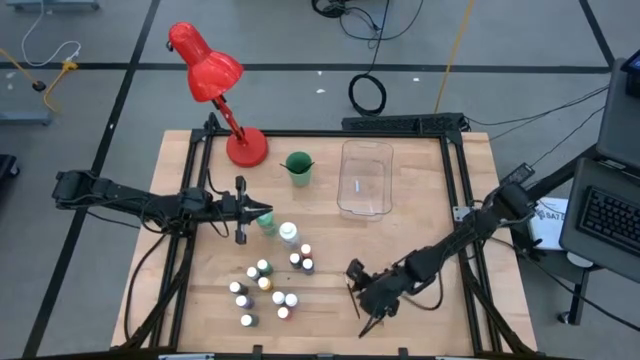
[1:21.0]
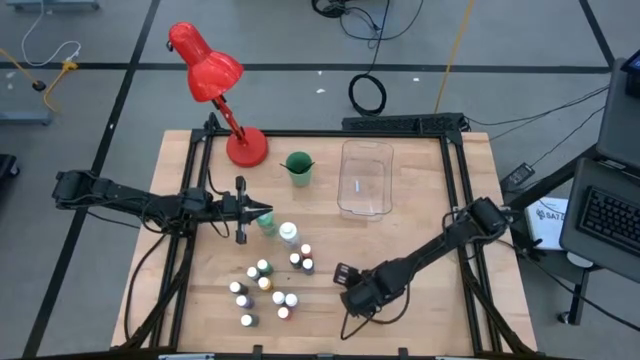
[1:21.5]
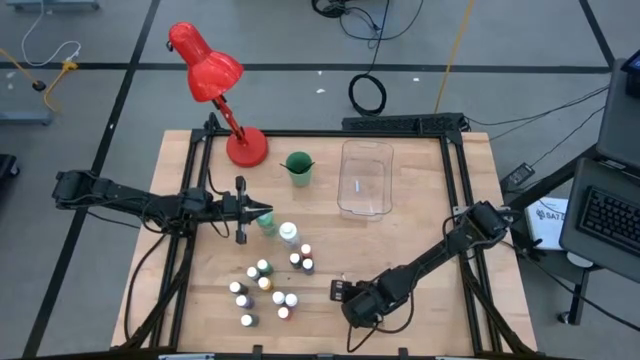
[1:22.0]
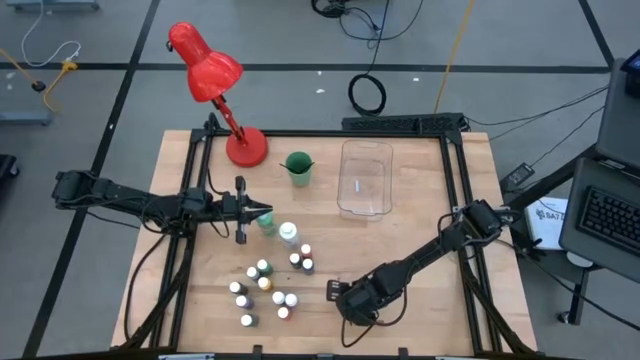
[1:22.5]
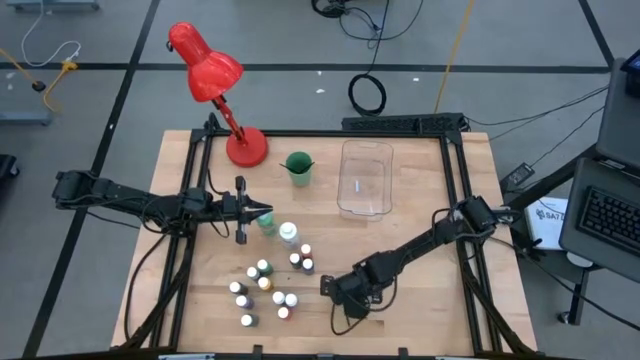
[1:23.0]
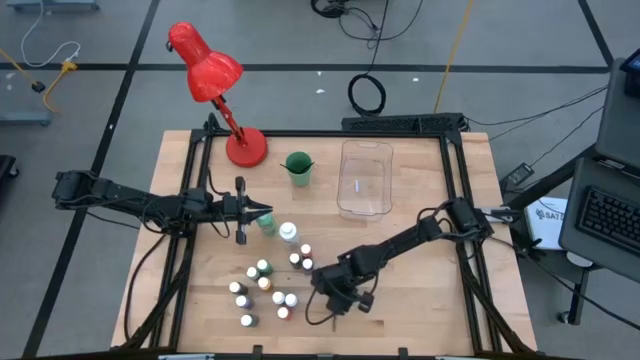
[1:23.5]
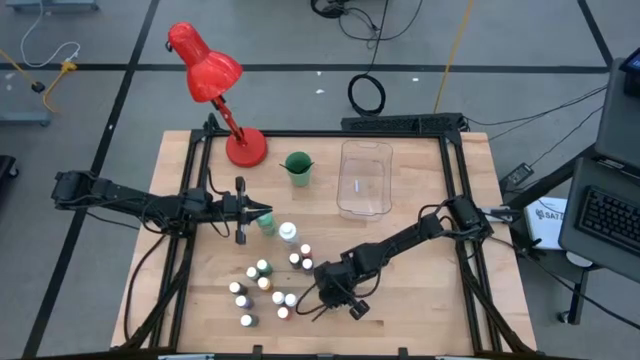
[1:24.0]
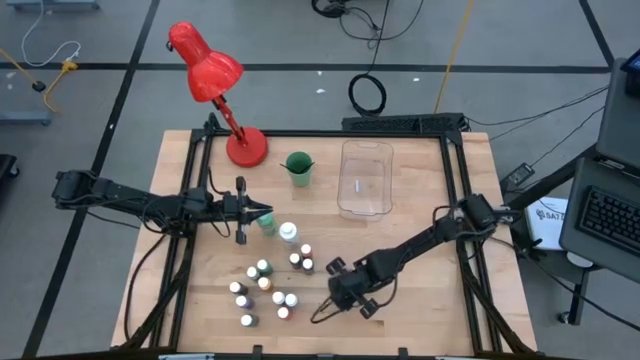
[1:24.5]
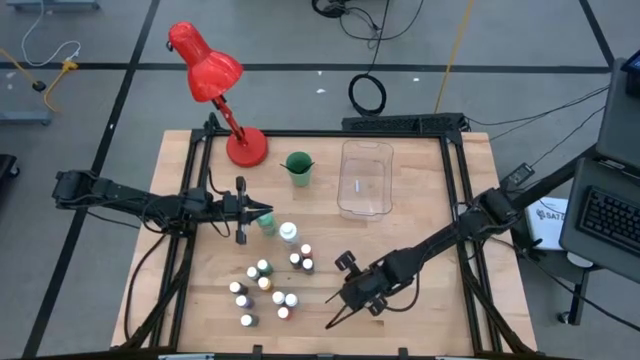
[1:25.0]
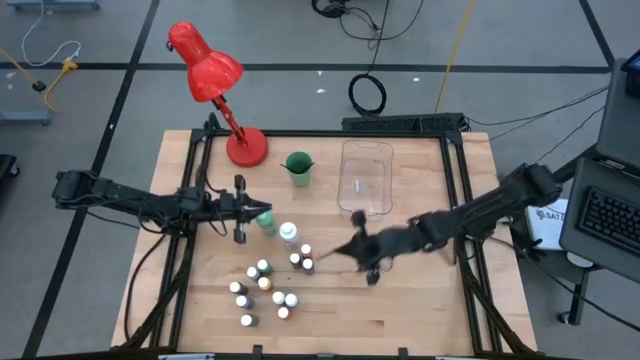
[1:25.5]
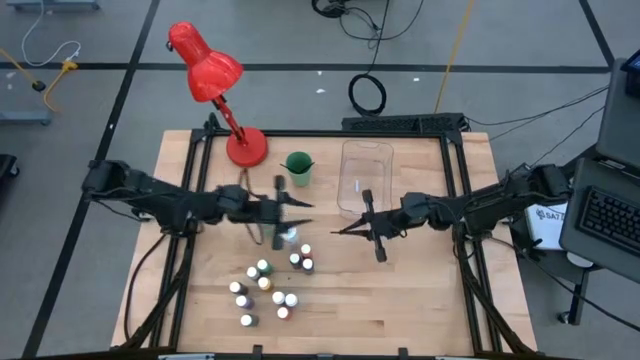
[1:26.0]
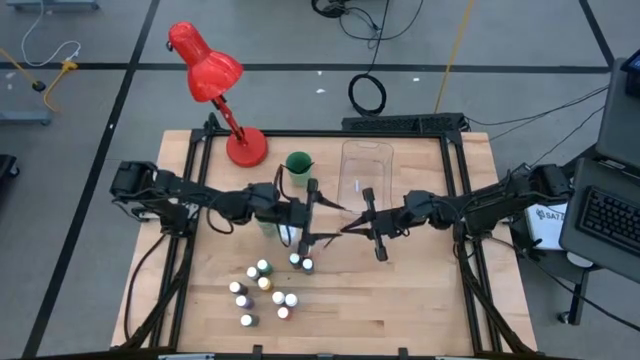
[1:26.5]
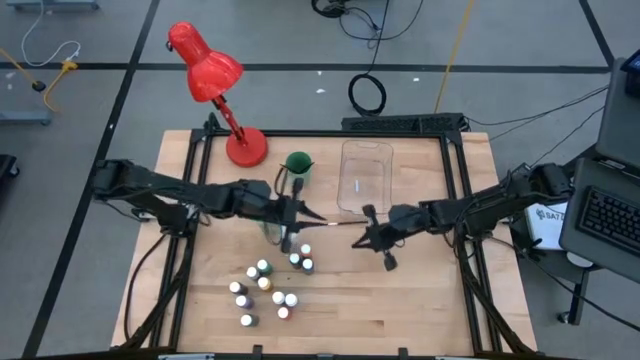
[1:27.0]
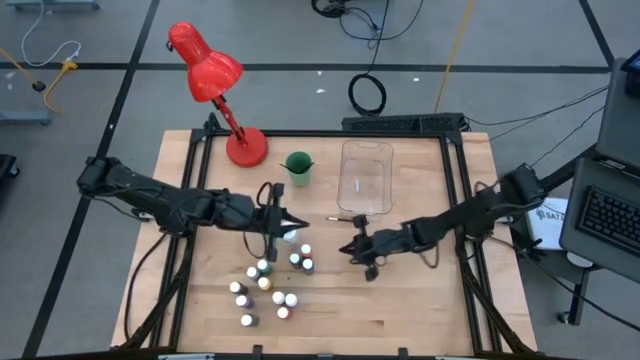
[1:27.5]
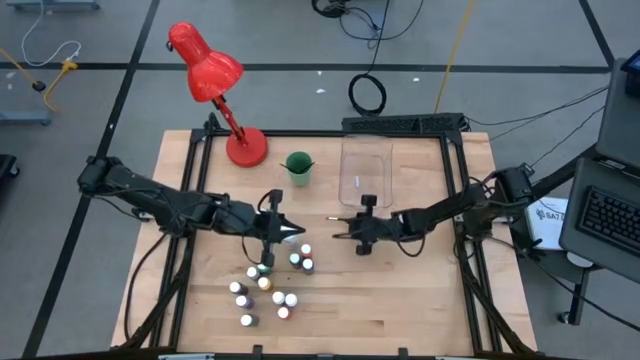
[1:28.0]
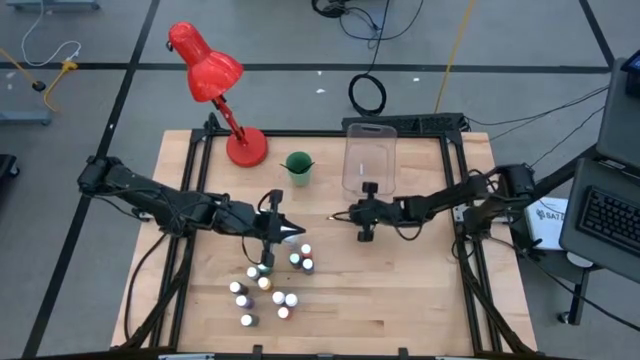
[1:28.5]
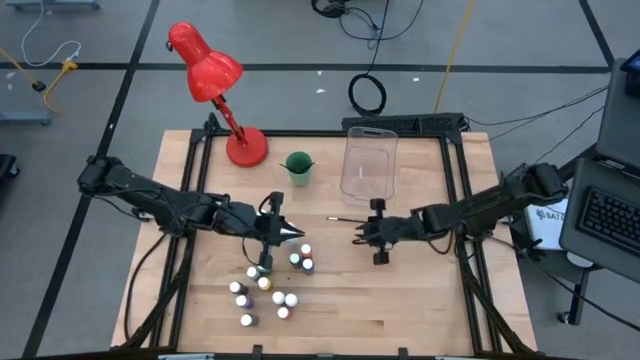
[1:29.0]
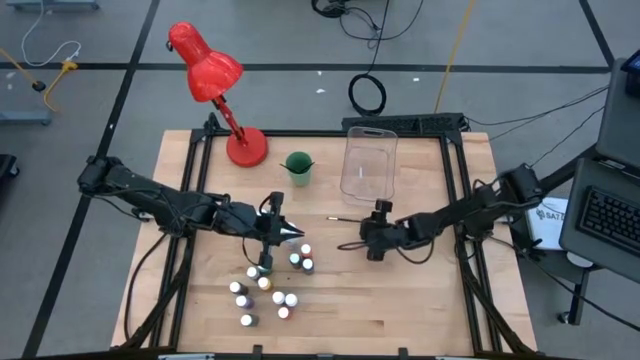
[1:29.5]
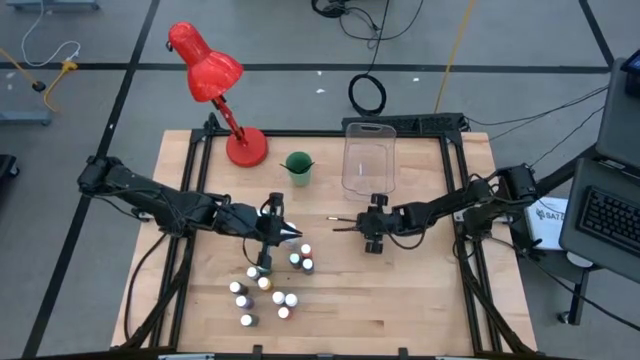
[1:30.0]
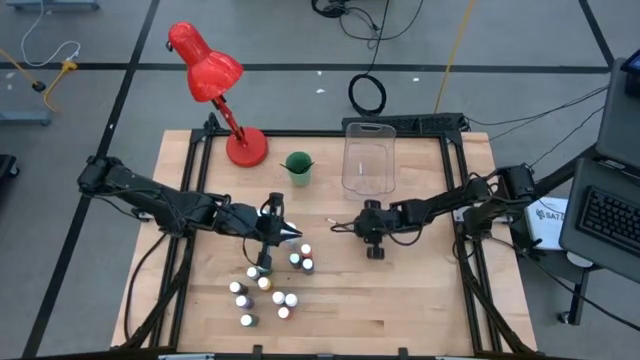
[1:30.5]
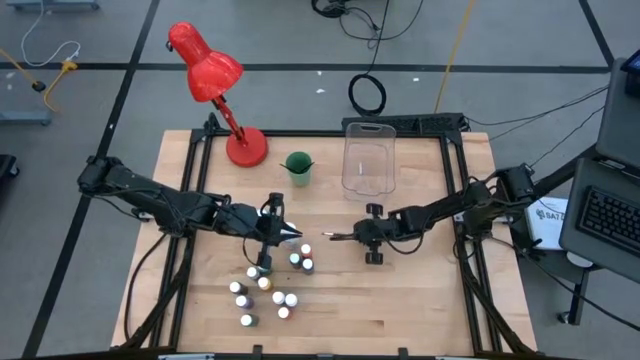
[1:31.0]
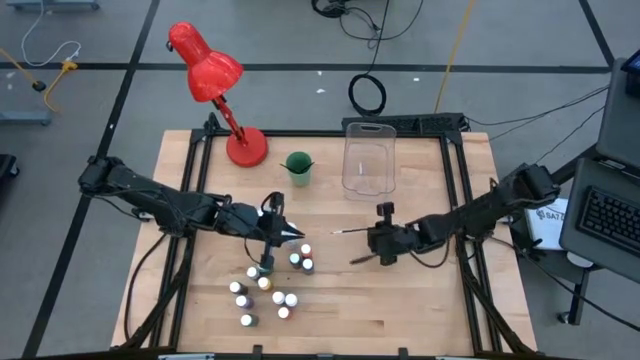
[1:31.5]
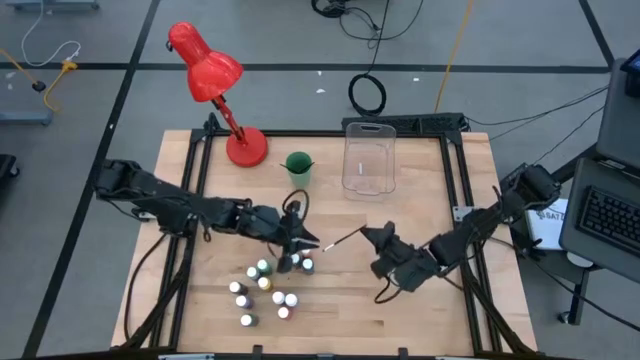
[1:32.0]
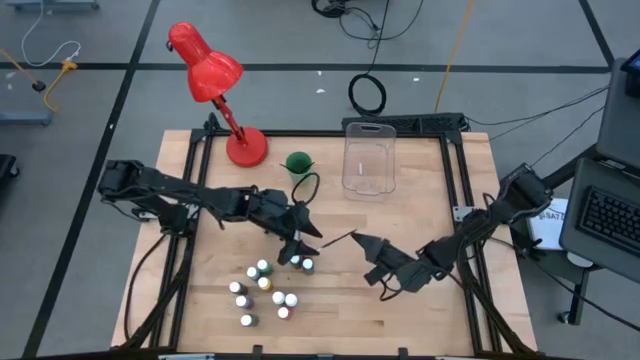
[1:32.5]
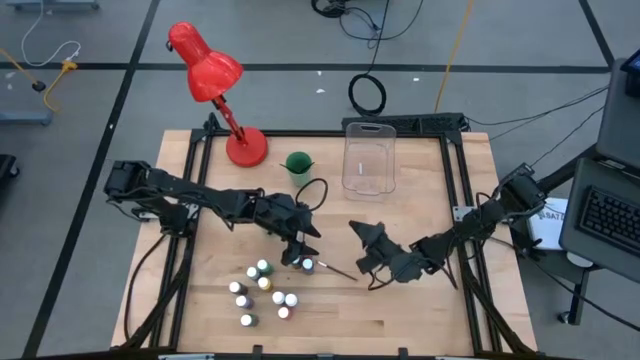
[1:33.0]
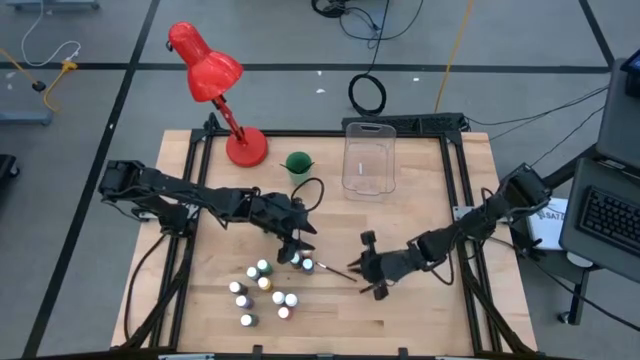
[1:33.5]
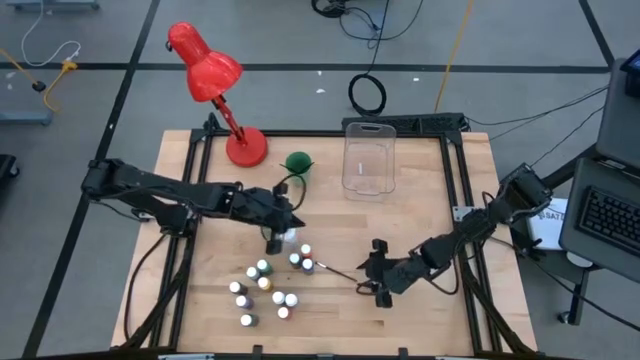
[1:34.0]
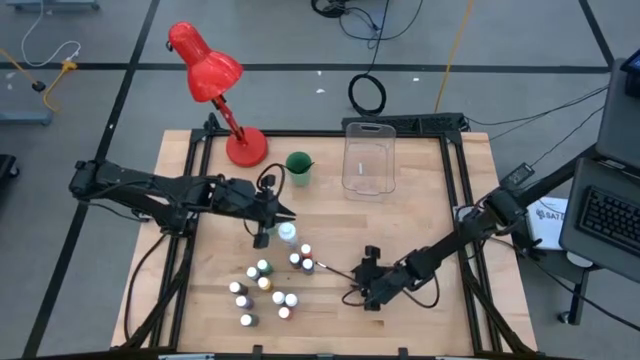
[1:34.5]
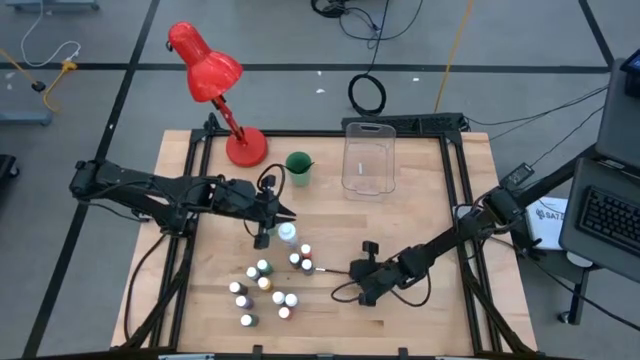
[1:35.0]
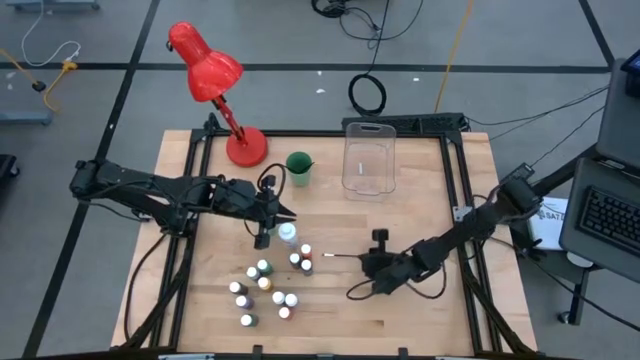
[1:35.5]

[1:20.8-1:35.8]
Task: Pick & Place Paint Supplies
Put the silver paintbrush into the green cup

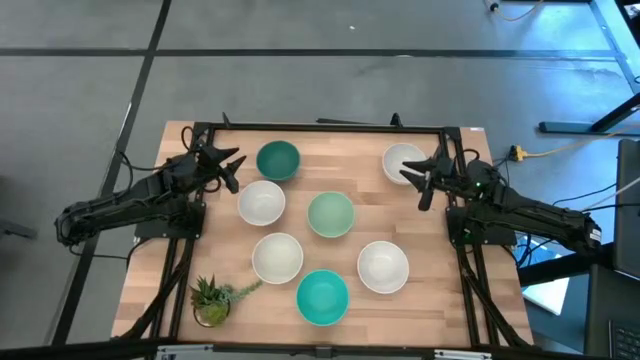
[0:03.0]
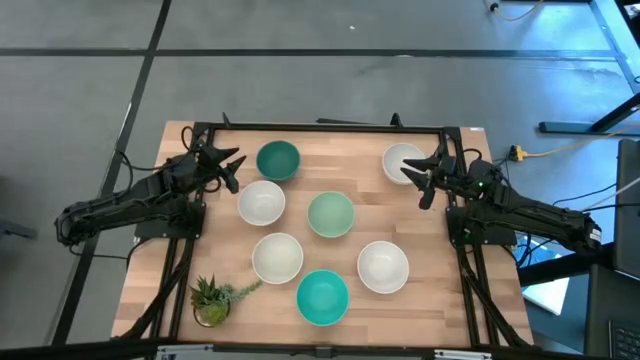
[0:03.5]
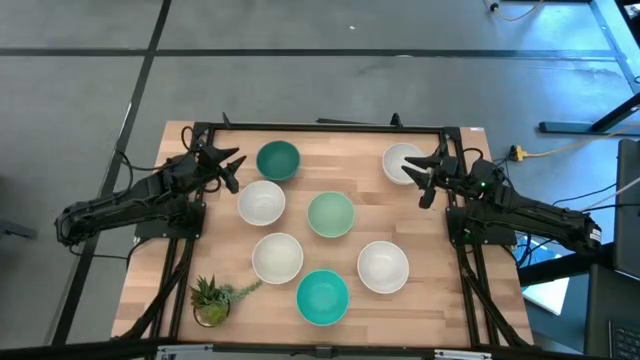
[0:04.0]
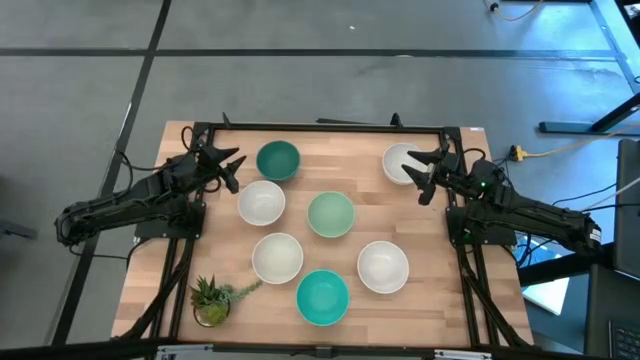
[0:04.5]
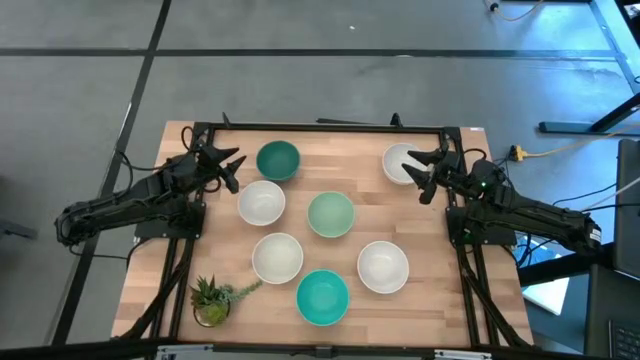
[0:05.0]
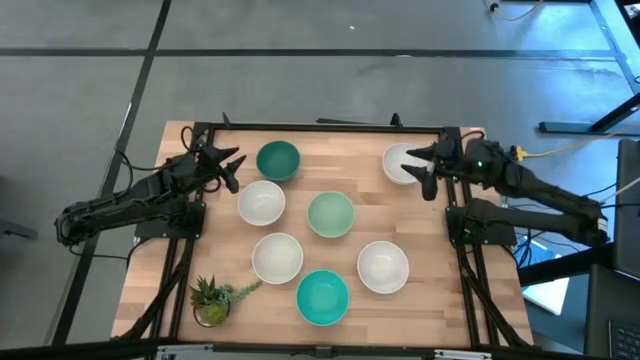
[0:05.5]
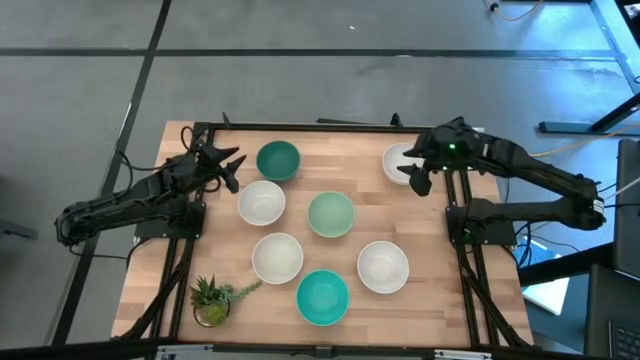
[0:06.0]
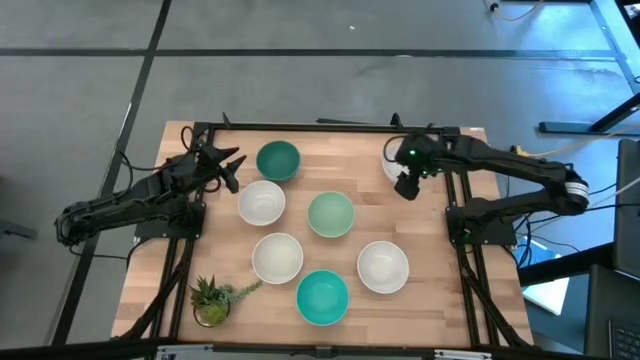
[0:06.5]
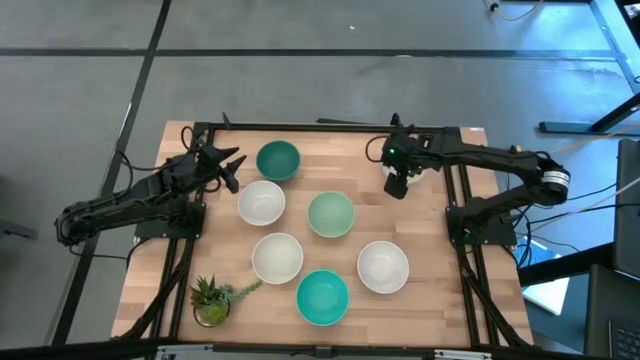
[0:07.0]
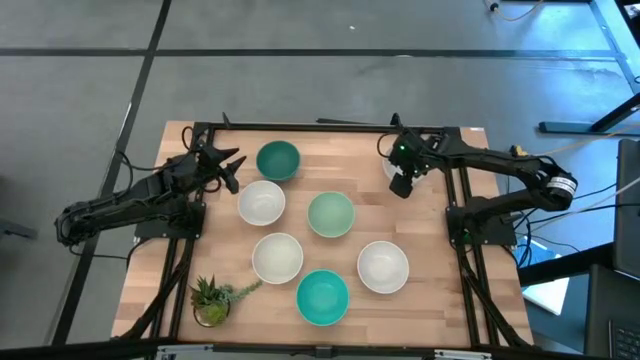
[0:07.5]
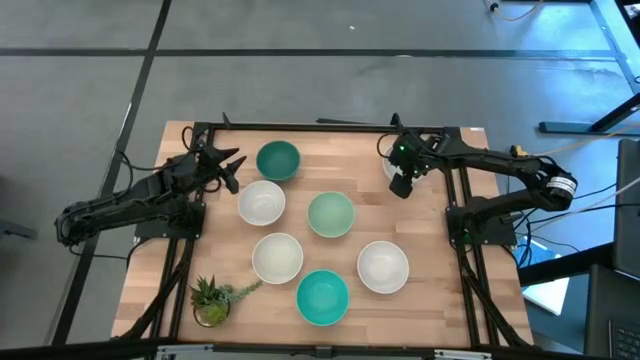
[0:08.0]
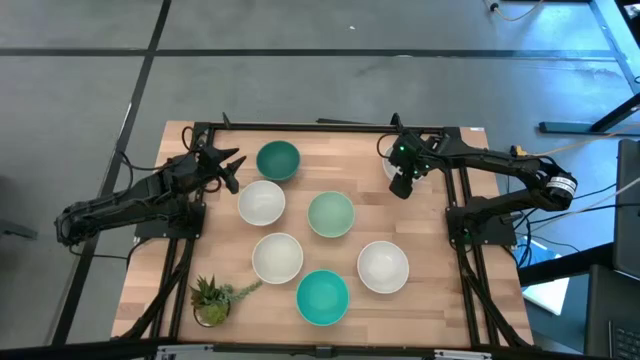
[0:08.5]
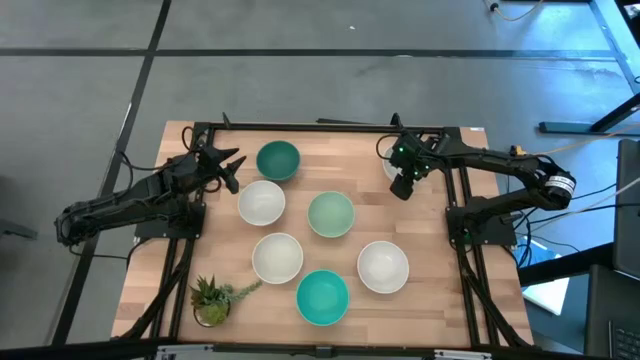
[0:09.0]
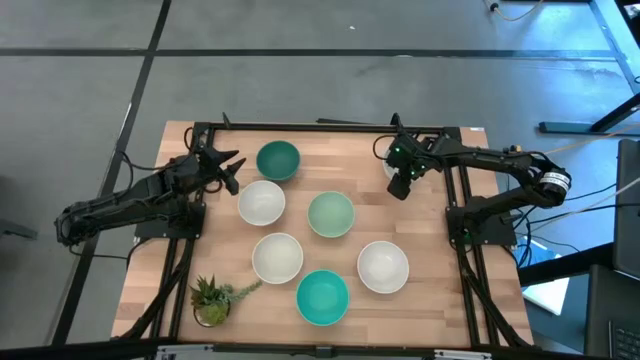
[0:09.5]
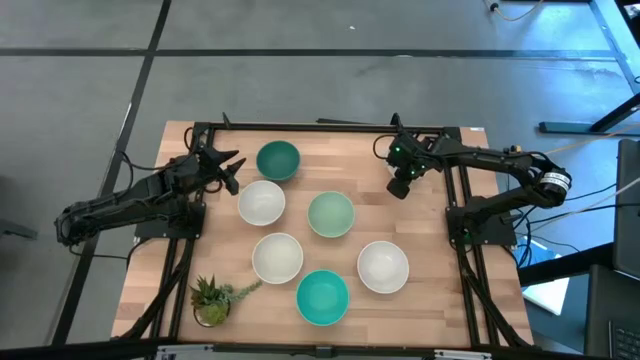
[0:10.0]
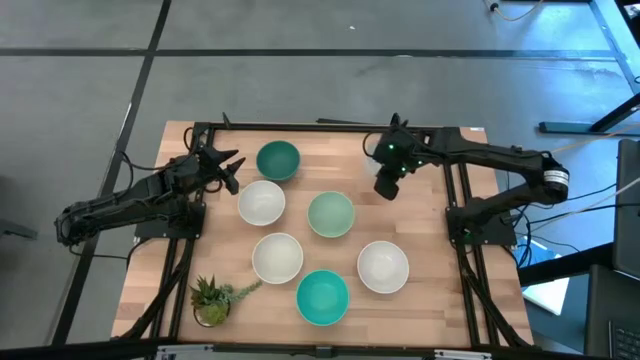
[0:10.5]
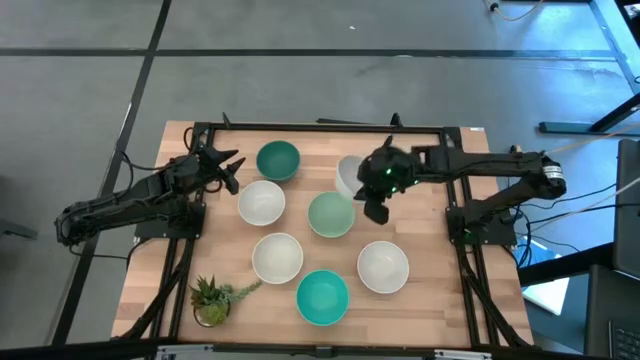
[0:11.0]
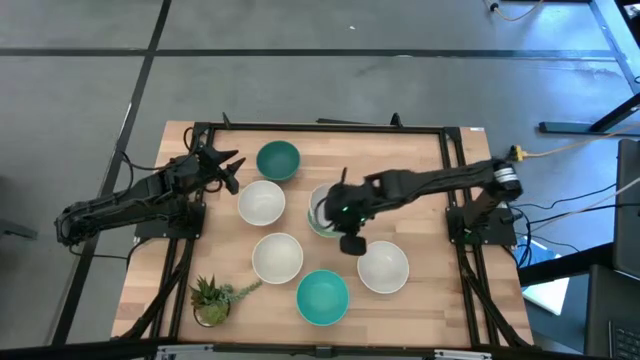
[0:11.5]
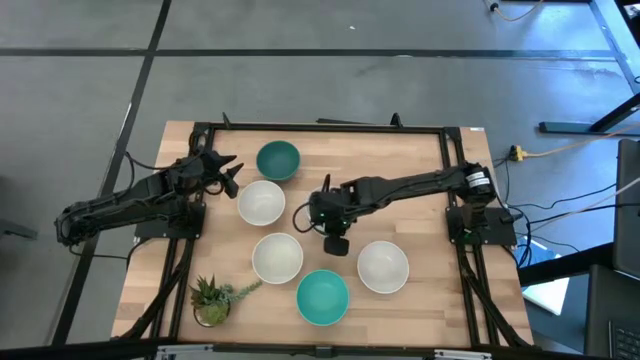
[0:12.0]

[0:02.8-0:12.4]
Task: Nest bowls inside each other
Stack the white bowl on the light green bowl
